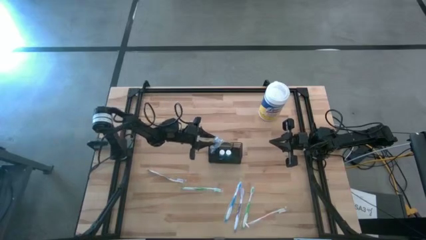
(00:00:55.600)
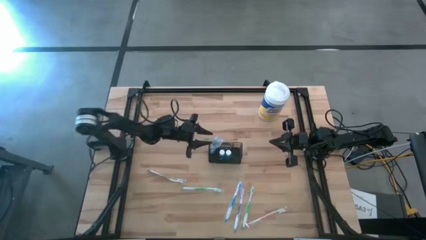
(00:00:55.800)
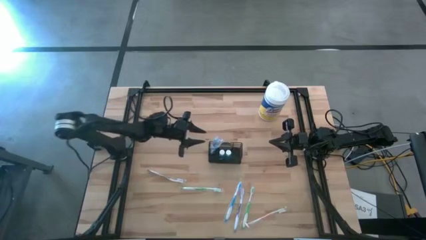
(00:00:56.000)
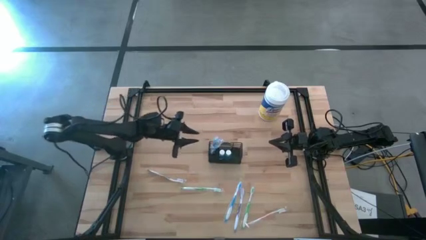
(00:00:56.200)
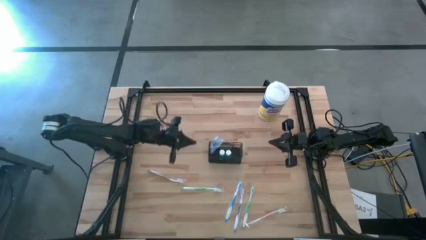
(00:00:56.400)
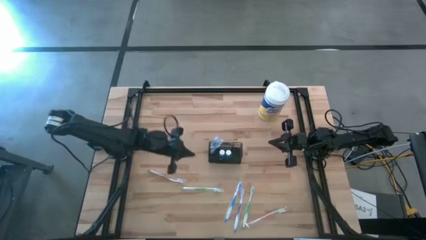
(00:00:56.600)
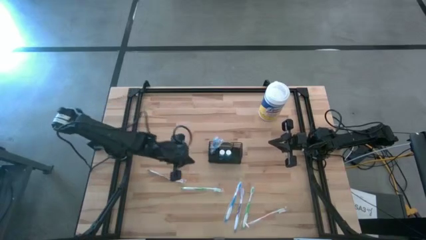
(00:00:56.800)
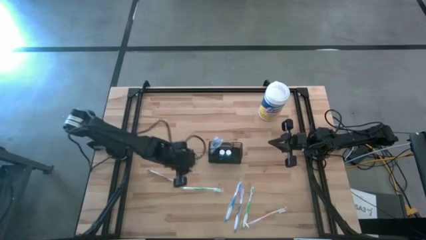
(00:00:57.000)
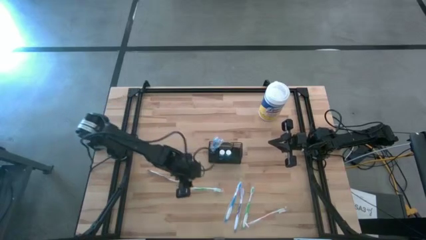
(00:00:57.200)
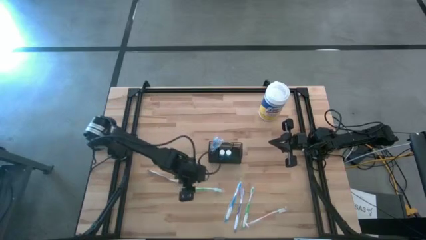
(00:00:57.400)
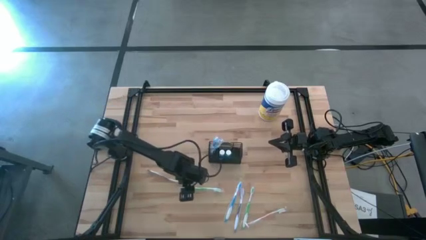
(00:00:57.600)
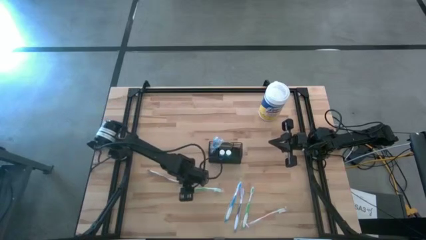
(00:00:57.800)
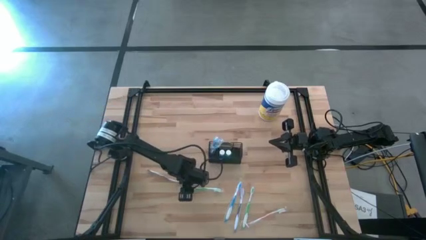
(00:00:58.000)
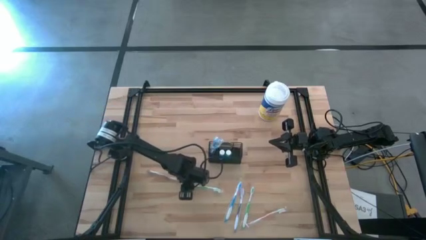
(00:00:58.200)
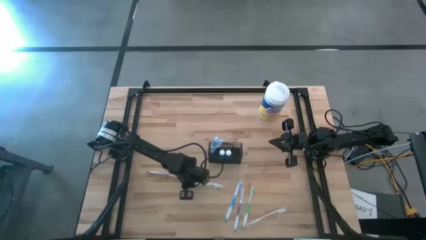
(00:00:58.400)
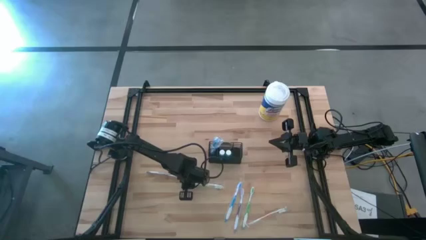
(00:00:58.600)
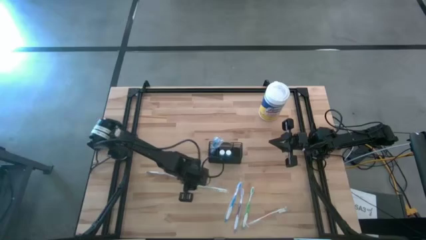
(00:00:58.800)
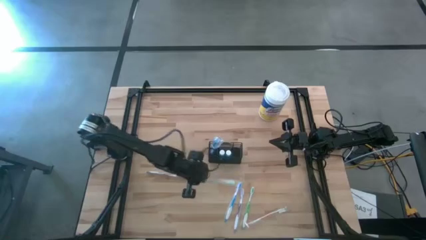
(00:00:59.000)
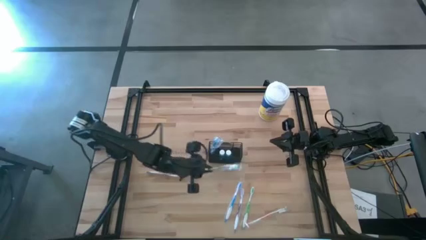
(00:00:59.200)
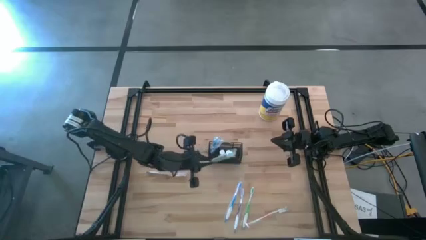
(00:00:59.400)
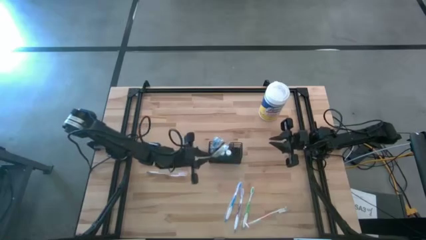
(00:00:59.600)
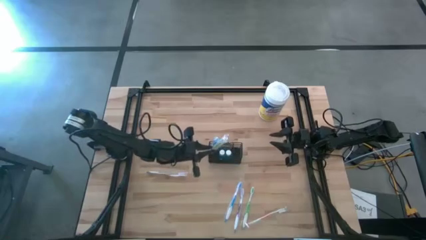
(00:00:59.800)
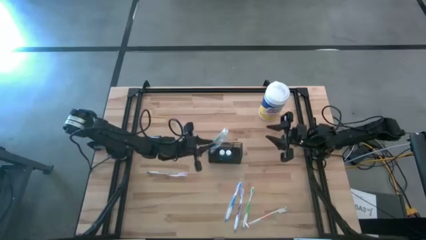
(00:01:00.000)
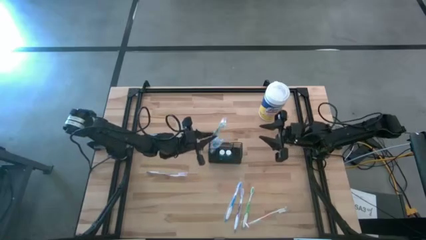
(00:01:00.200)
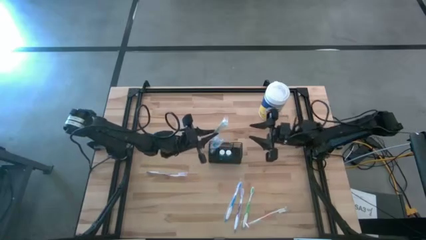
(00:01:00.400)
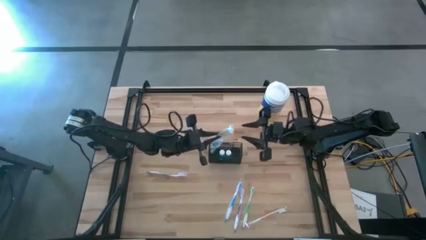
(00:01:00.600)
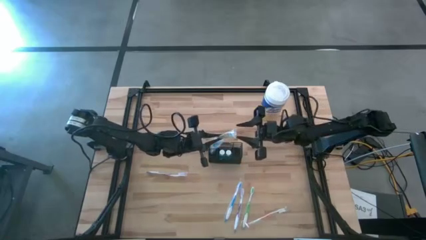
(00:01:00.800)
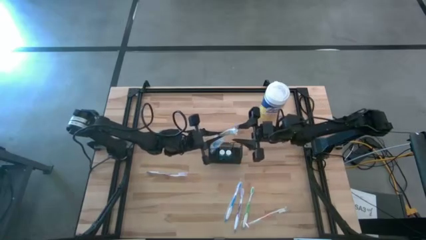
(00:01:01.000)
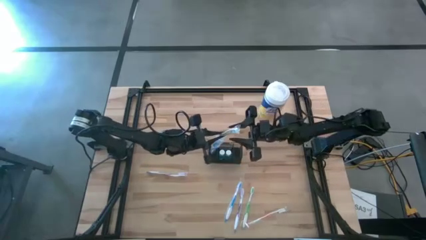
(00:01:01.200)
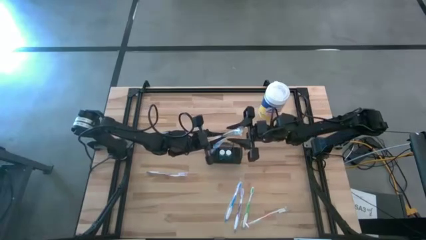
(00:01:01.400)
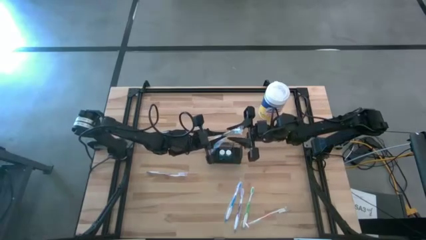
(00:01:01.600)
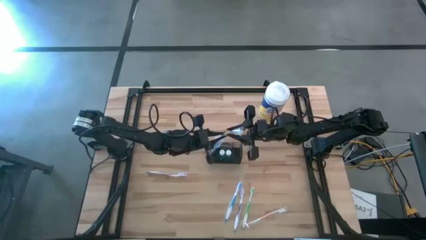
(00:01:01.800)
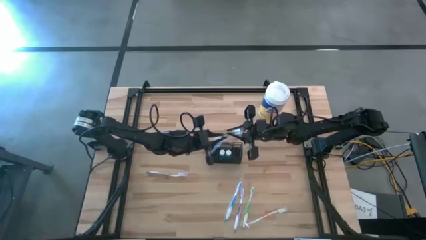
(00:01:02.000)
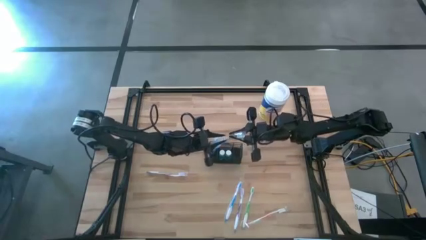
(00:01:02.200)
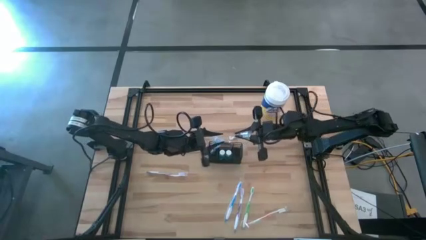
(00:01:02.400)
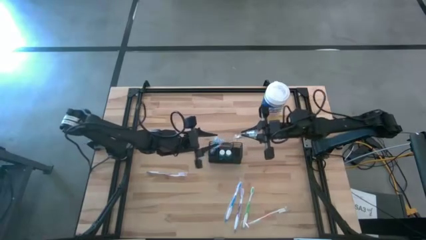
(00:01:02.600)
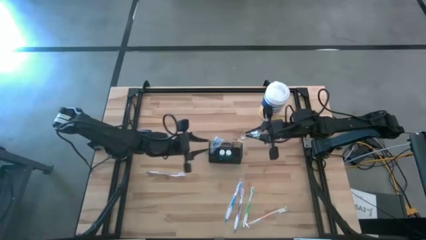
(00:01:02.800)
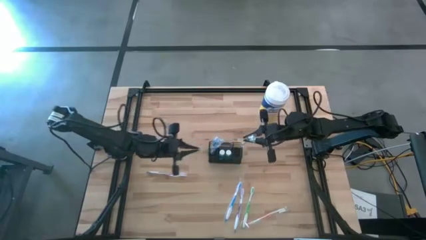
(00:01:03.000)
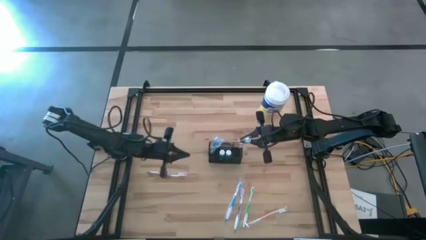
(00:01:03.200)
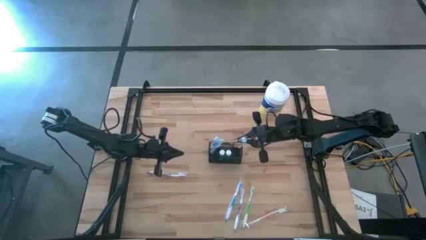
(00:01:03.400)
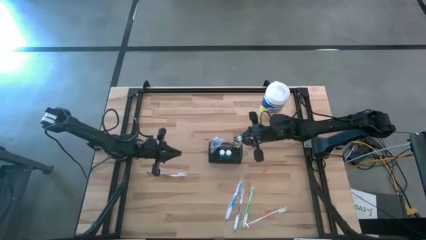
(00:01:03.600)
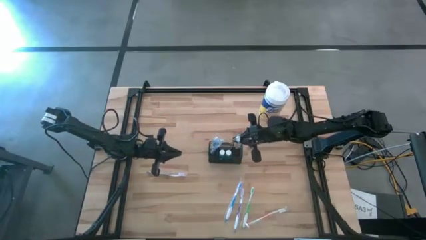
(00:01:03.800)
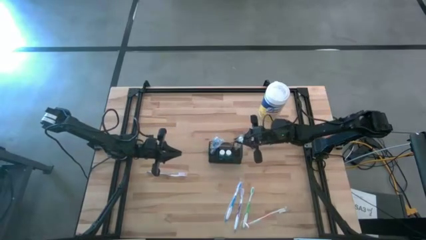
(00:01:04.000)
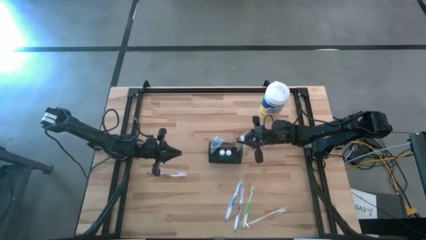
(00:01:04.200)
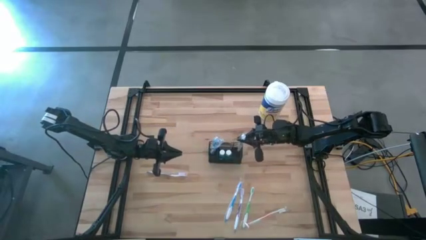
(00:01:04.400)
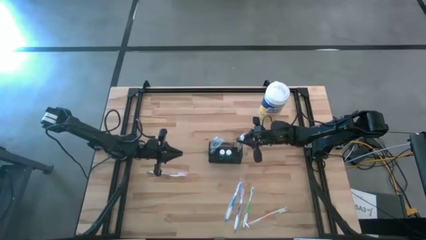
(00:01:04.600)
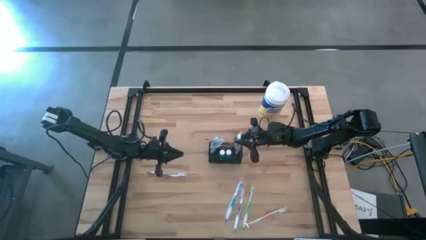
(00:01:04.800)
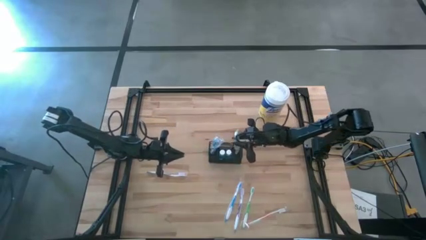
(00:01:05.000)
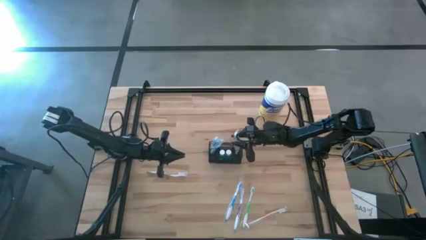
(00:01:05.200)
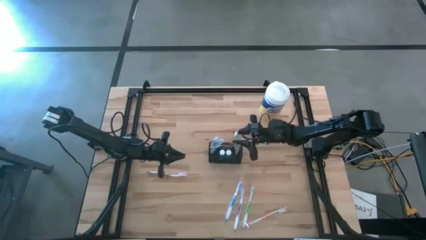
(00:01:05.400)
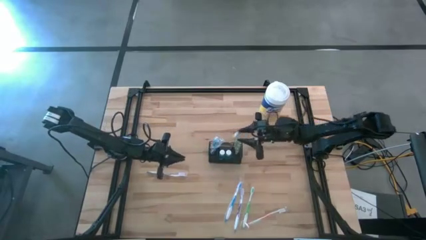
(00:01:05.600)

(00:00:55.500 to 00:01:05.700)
Task: Pick & Place toothbrushing station
Put the green toothbrush into the wire organizer

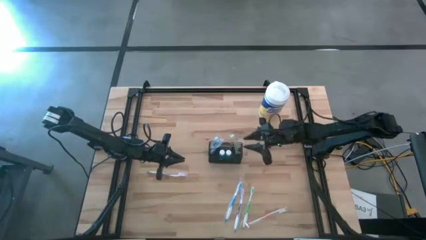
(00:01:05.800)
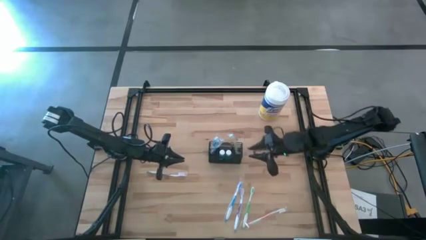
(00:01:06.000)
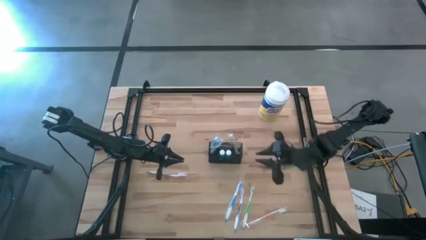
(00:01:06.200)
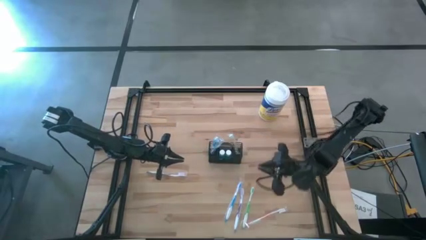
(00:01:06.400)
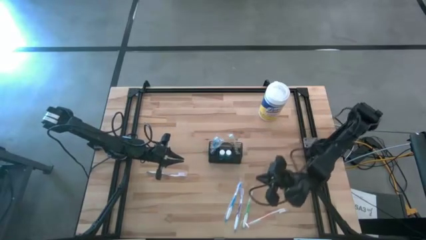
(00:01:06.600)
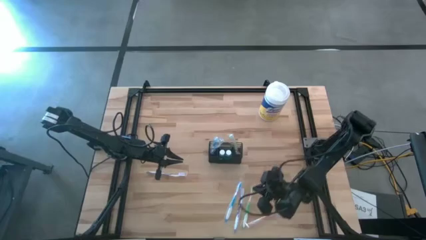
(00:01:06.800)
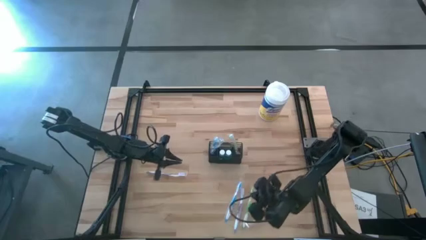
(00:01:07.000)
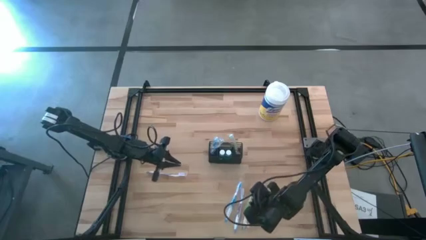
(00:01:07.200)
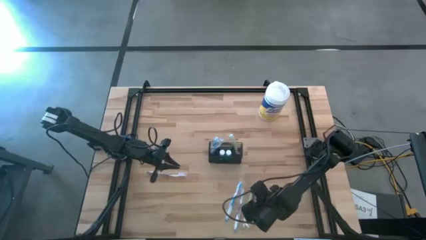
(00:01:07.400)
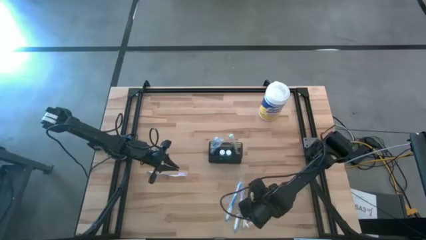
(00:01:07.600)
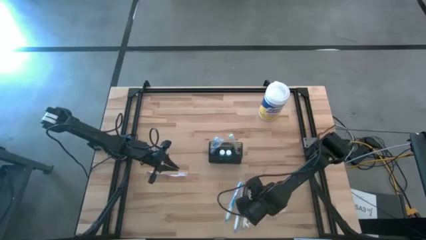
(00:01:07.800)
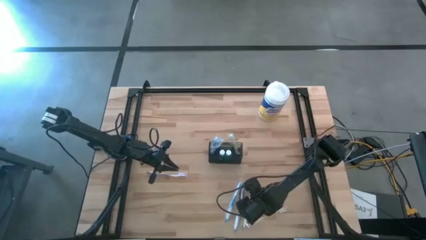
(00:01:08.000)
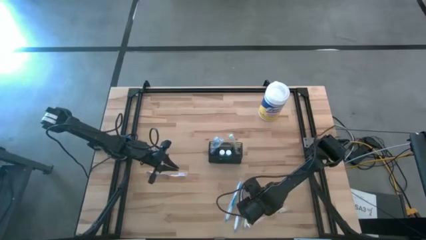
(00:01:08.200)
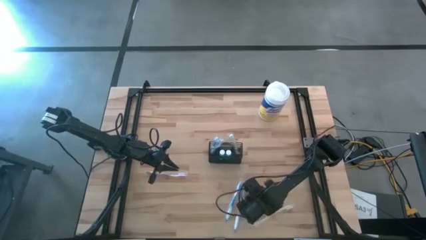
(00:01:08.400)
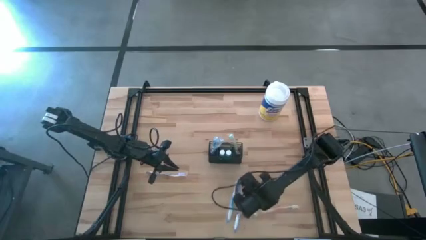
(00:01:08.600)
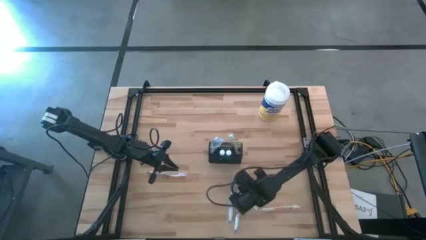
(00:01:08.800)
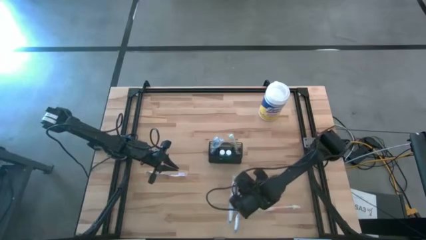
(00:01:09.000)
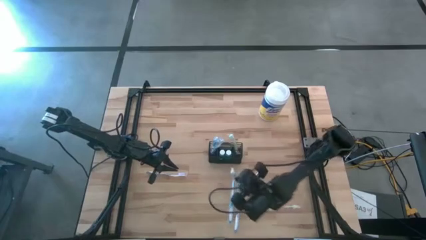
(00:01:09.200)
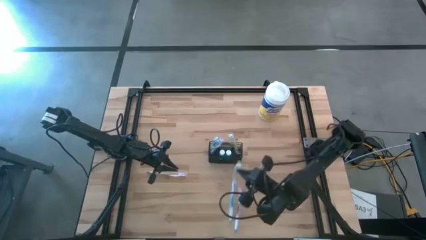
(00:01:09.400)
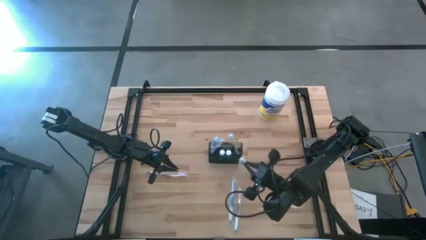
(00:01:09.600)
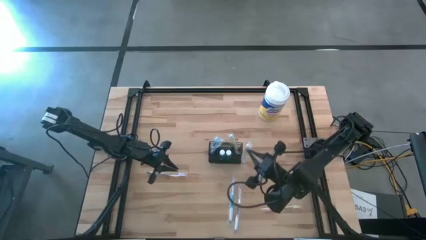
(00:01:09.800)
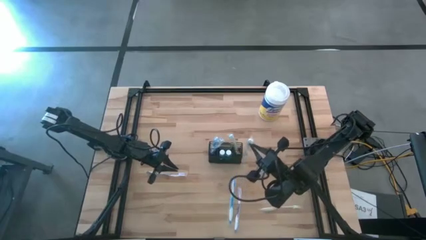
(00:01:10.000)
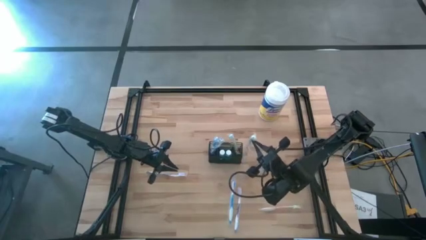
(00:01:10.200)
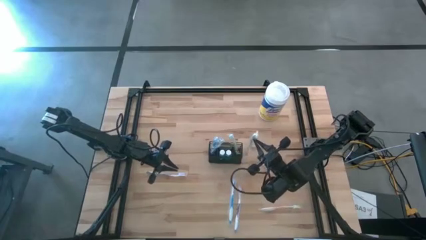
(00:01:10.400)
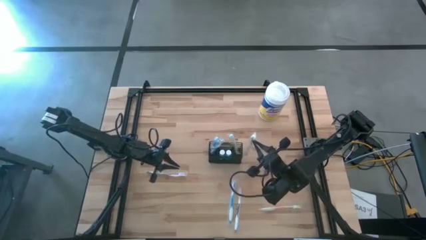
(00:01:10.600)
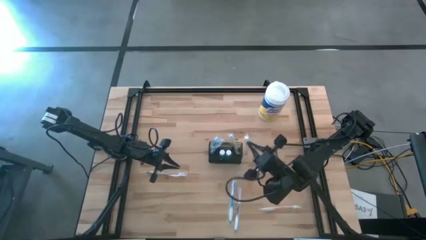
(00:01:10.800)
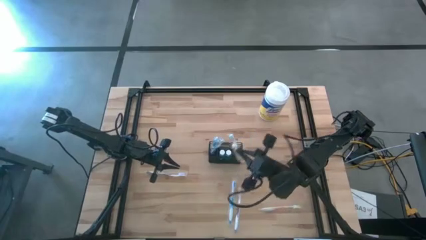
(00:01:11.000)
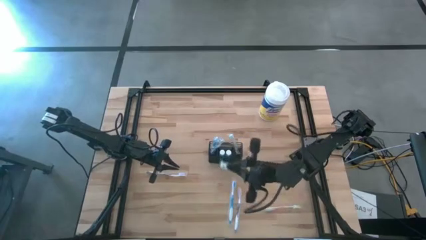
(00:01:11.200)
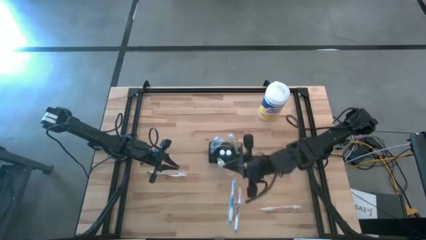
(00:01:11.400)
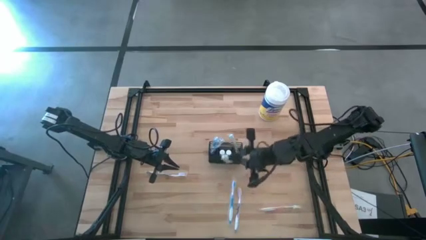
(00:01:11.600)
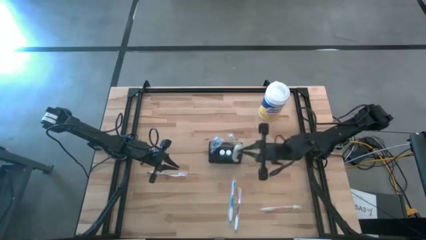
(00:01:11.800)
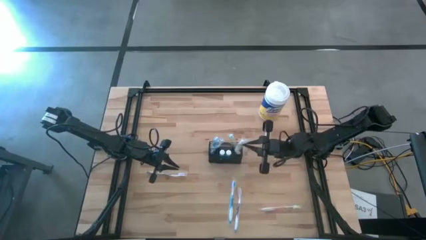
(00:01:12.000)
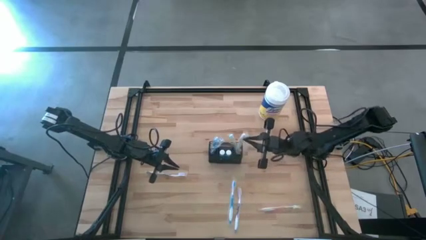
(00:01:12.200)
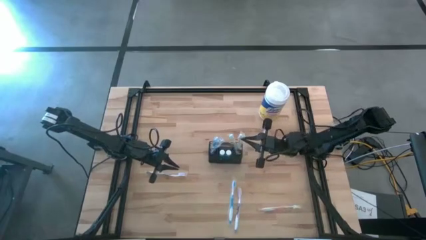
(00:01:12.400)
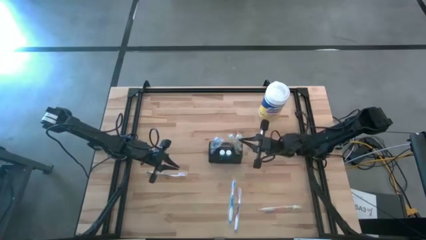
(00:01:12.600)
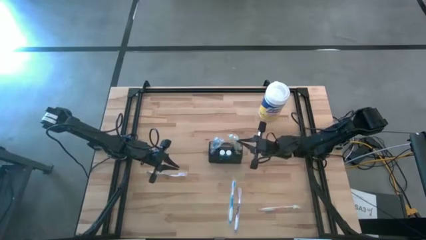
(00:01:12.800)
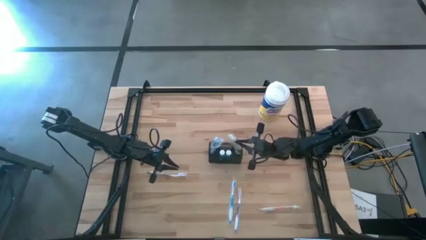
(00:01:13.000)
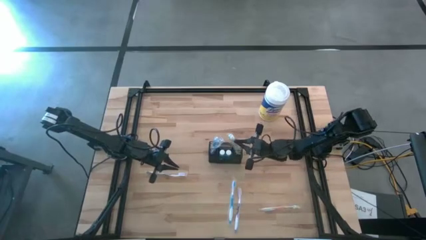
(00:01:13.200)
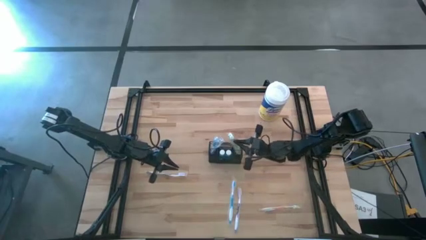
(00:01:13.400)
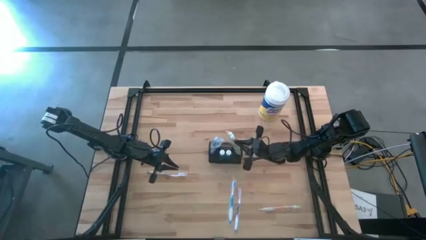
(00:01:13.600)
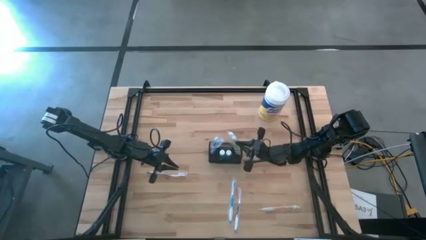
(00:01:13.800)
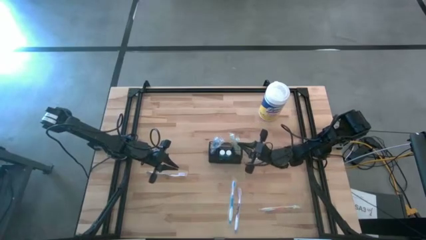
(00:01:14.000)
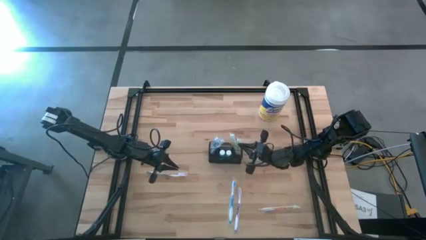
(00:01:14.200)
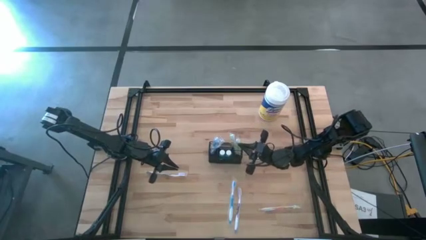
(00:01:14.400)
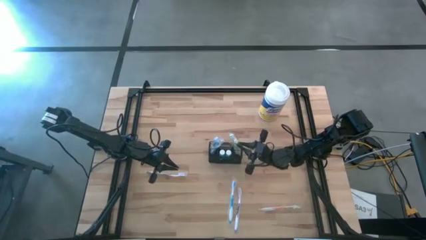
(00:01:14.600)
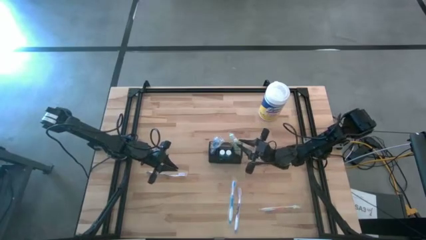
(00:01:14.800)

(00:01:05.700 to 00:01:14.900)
Put the green toothbrush into the wire organizer
